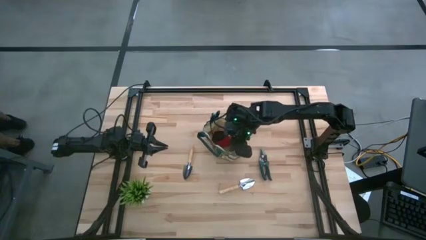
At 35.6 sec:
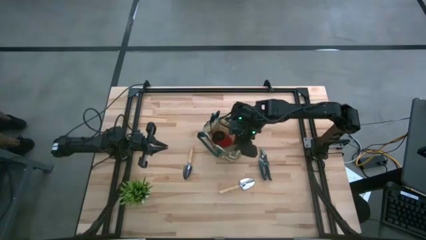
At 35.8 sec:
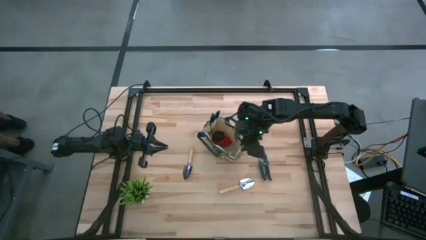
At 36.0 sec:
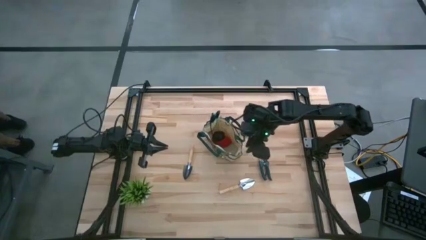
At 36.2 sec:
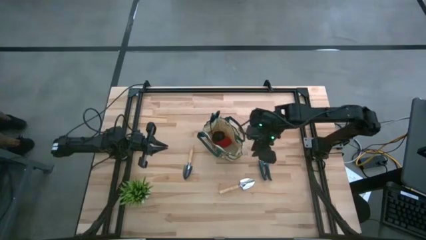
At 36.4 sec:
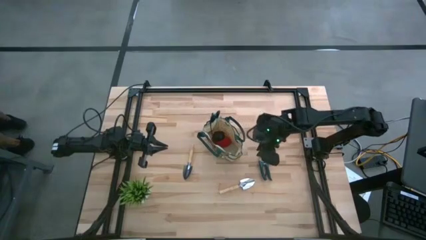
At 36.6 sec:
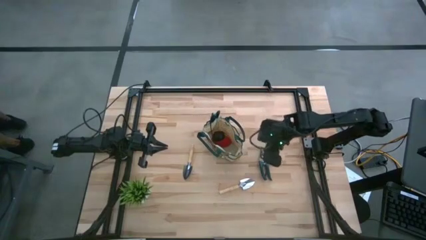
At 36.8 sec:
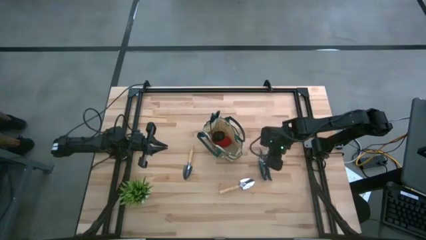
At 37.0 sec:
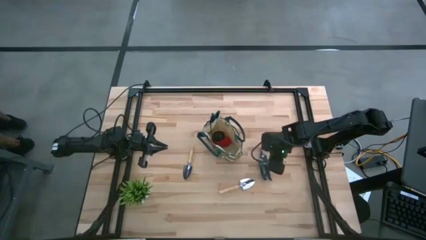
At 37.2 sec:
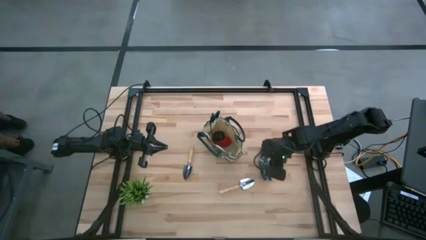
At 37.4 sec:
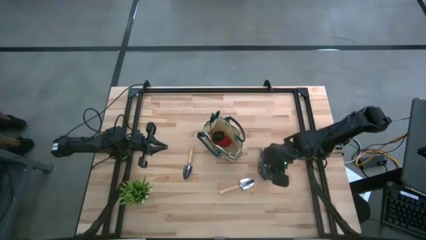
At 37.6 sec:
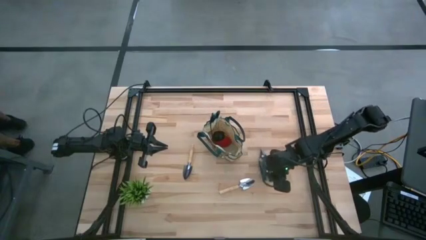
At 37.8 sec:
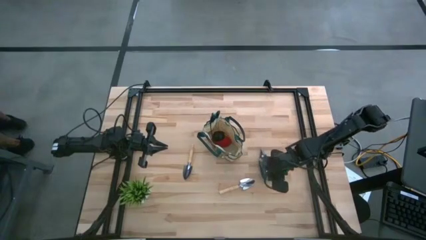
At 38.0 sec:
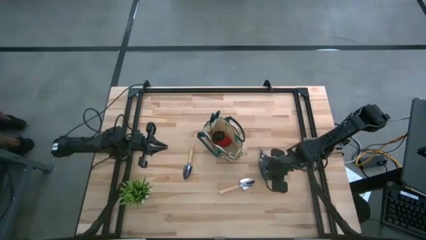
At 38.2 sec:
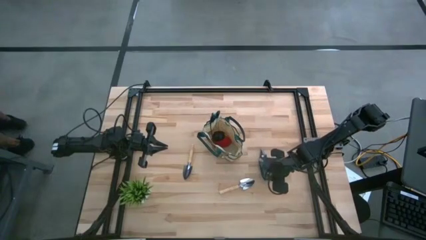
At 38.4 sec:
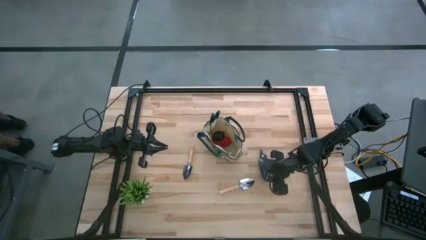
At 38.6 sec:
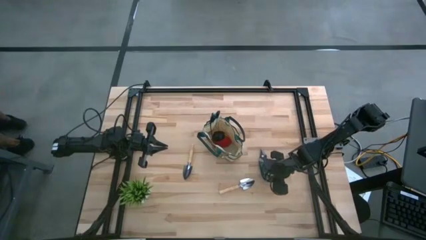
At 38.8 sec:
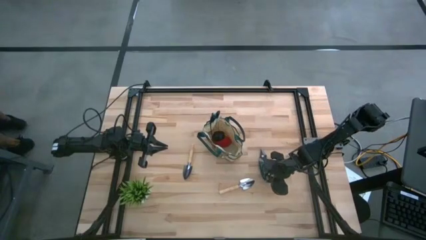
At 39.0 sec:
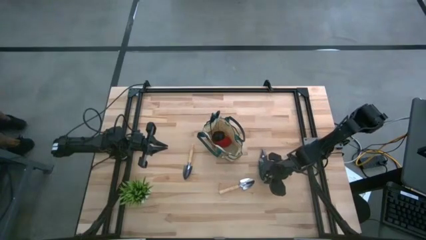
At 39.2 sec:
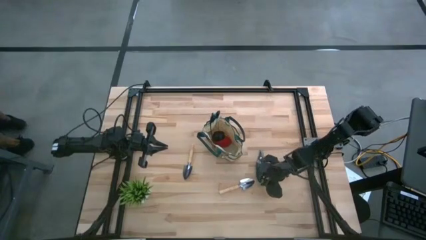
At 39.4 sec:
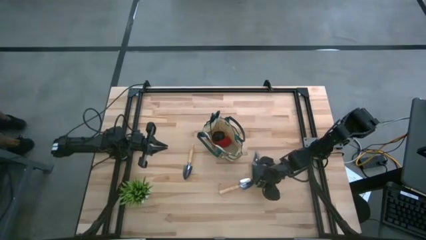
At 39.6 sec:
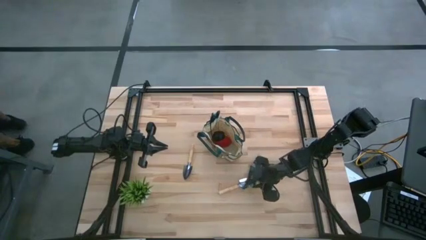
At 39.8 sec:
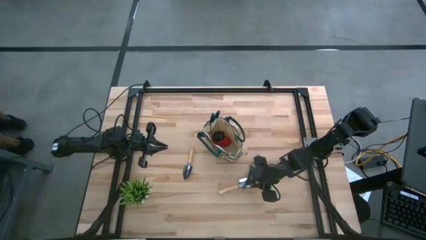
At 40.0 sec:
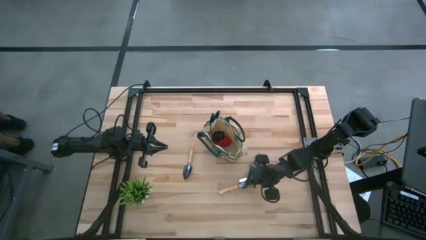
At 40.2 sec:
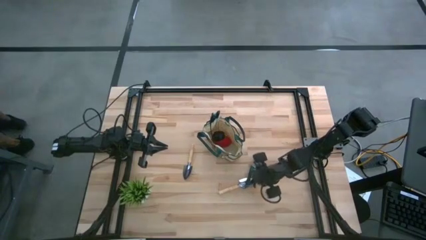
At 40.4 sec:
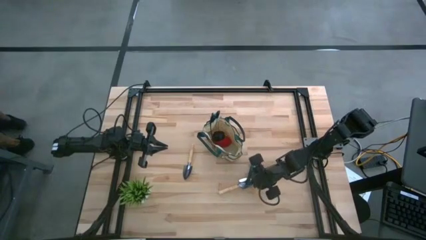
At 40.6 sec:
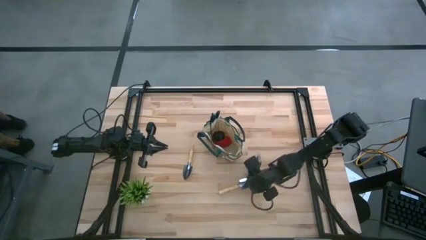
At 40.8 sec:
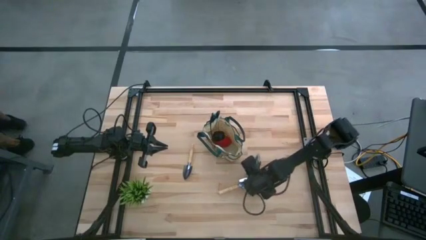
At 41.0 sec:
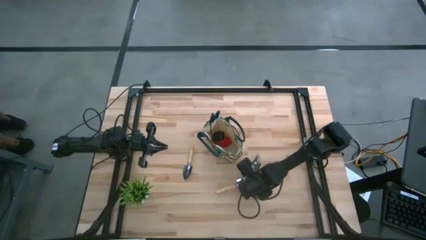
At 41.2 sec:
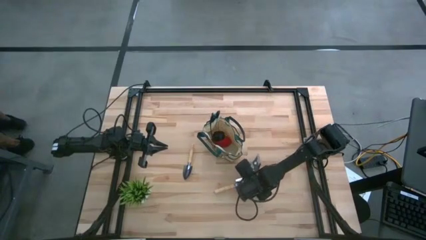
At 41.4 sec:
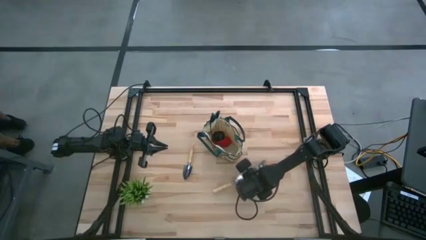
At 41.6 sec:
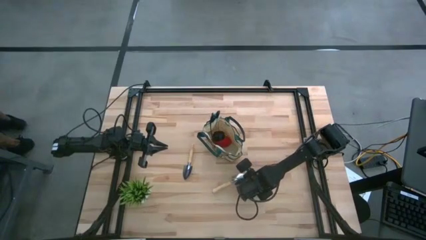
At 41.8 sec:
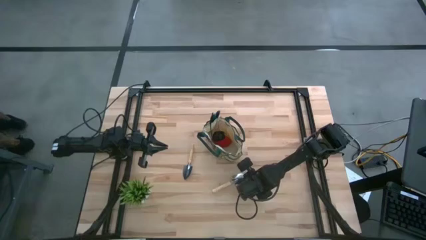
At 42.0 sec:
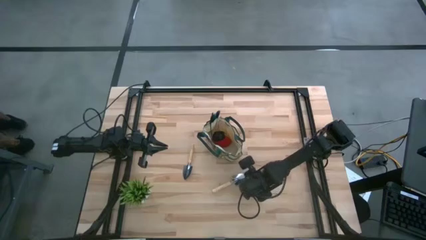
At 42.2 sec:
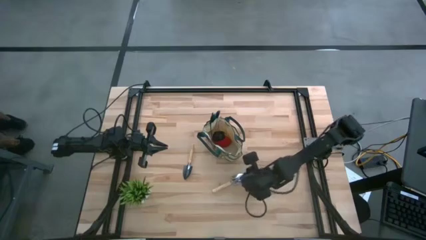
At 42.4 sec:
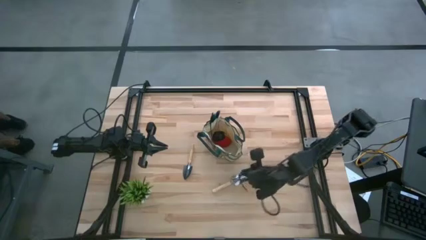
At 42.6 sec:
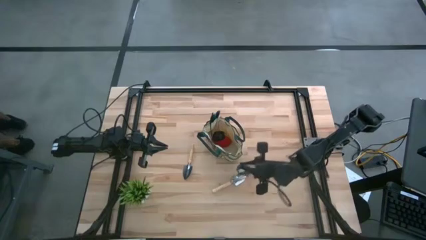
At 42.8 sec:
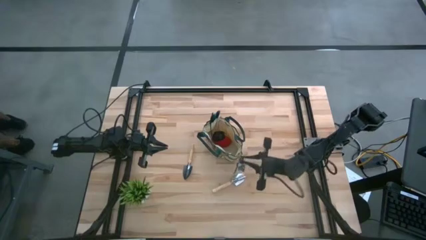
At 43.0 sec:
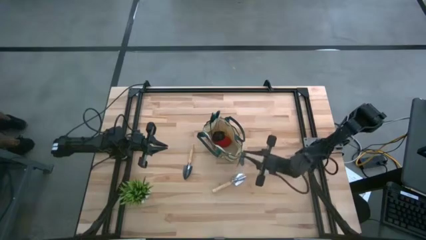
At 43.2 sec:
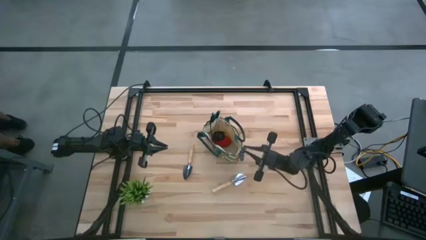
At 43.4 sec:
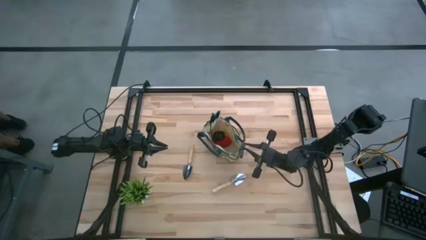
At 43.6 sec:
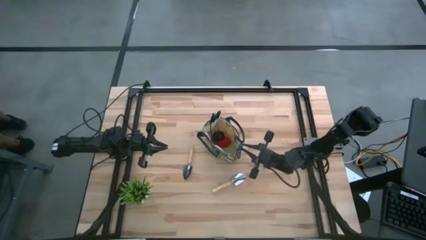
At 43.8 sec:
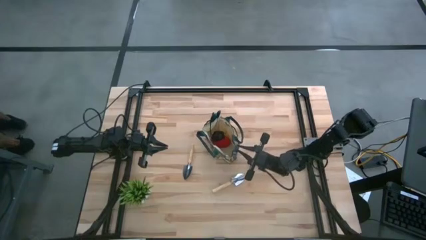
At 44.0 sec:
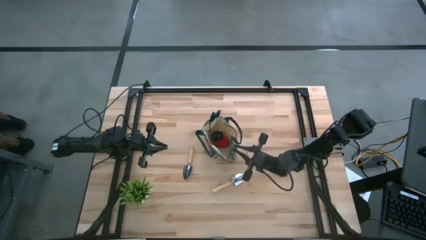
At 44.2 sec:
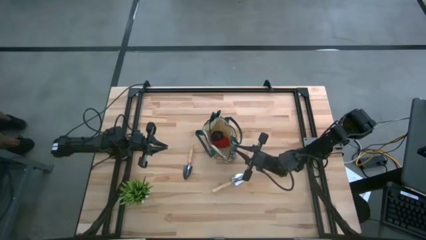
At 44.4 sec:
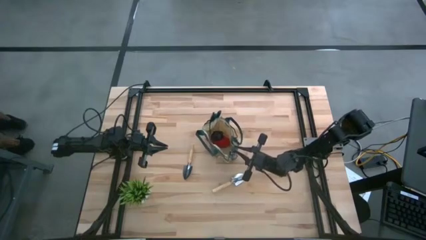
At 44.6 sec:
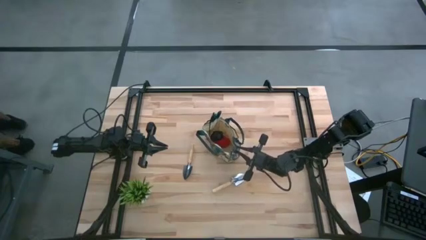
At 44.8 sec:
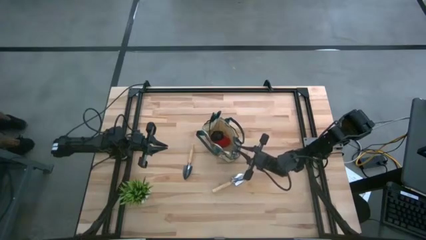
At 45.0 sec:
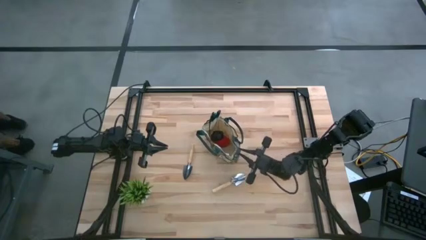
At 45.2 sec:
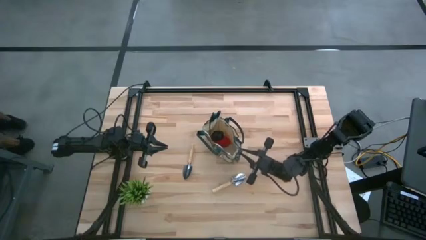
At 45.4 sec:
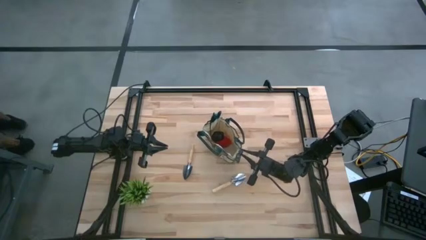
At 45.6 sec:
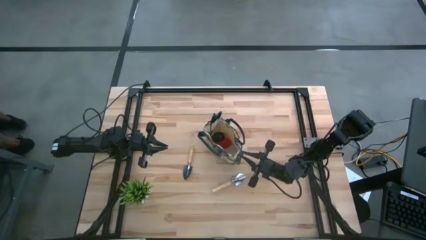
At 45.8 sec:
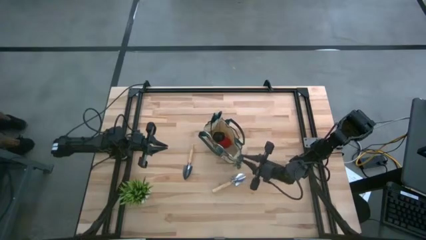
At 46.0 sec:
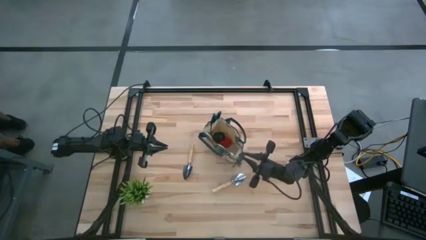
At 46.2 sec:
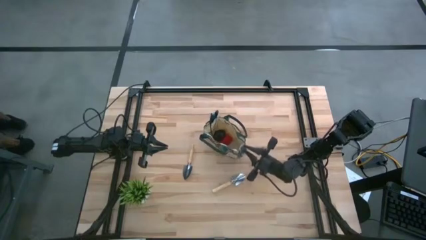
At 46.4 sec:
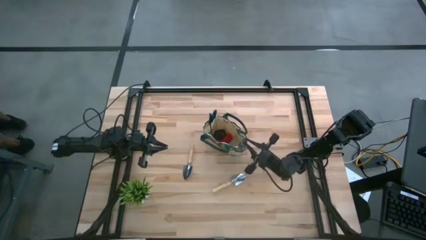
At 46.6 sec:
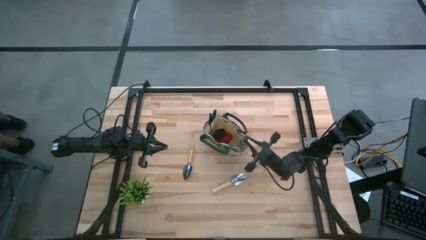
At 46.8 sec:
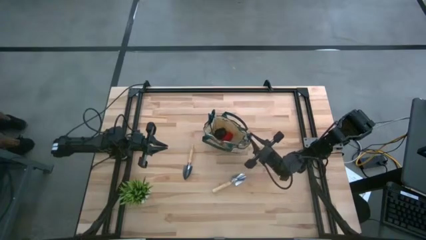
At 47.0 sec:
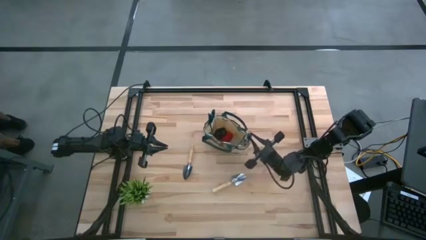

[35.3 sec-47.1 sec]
Task: Pick & Place Garden tools in Gardening bag
Put the shear scissors into the gardening bag

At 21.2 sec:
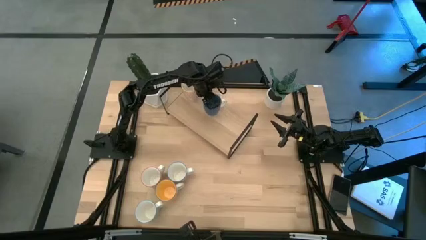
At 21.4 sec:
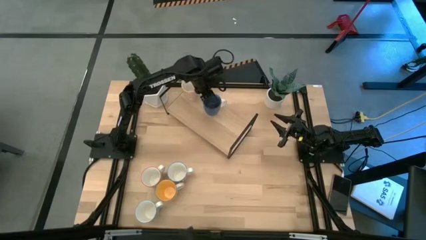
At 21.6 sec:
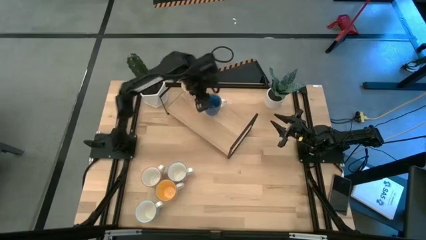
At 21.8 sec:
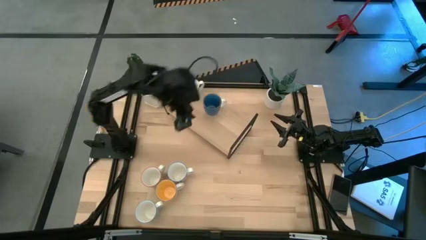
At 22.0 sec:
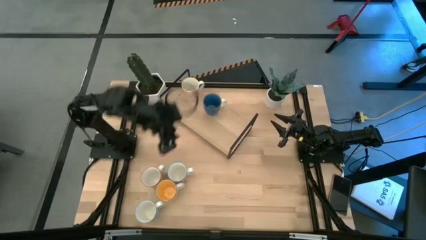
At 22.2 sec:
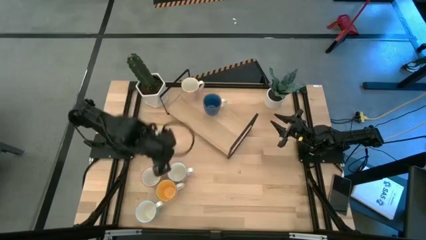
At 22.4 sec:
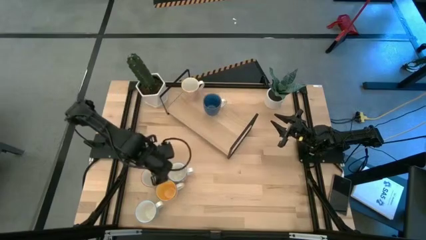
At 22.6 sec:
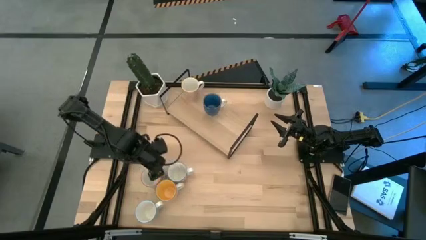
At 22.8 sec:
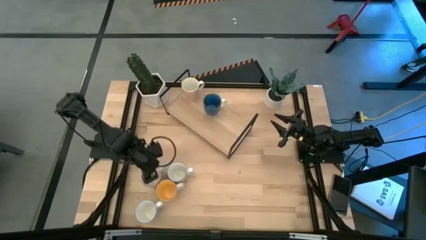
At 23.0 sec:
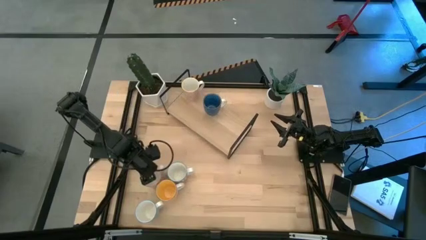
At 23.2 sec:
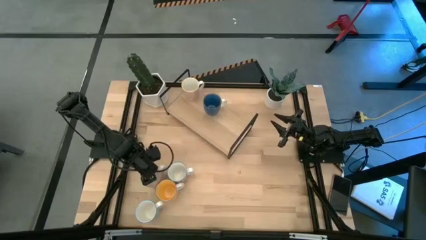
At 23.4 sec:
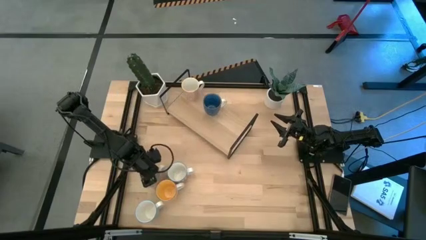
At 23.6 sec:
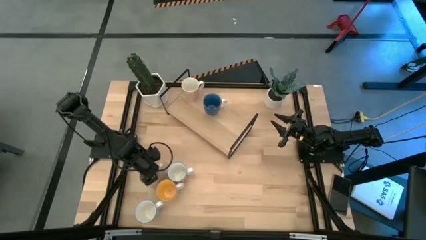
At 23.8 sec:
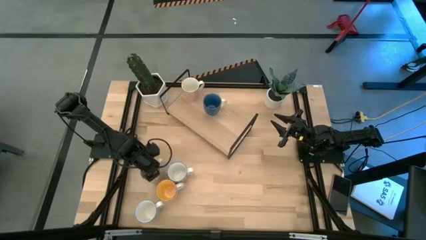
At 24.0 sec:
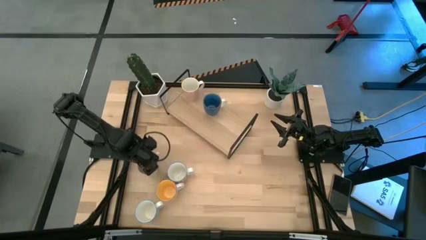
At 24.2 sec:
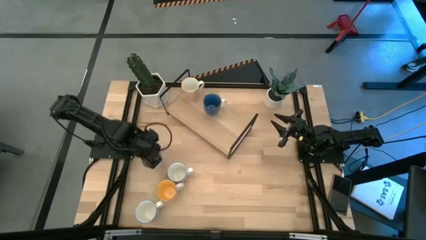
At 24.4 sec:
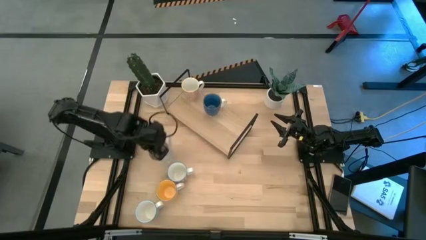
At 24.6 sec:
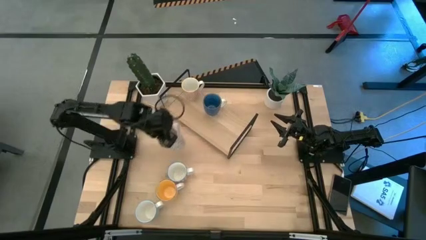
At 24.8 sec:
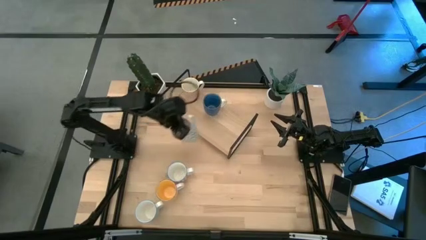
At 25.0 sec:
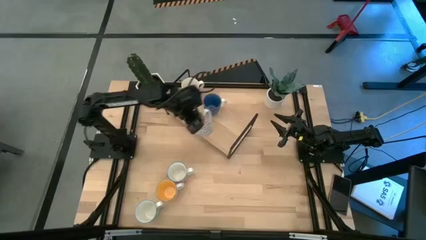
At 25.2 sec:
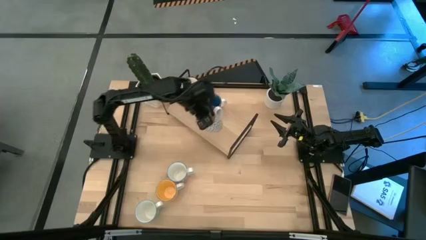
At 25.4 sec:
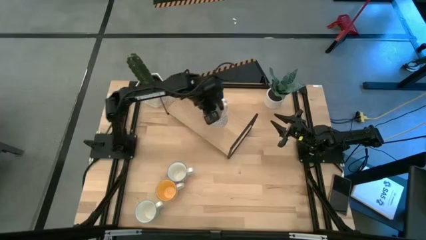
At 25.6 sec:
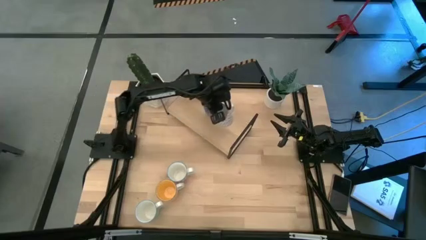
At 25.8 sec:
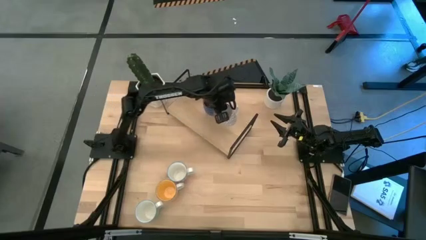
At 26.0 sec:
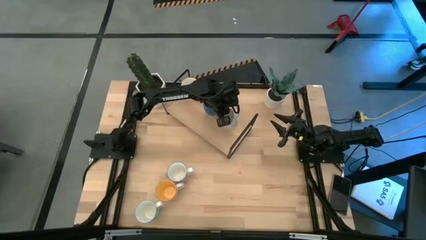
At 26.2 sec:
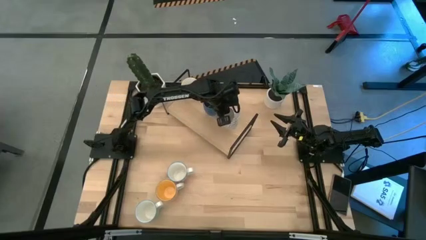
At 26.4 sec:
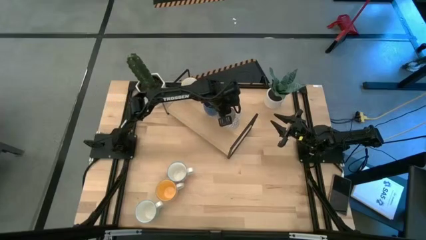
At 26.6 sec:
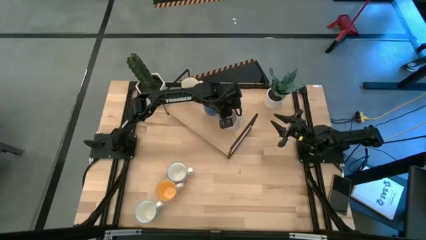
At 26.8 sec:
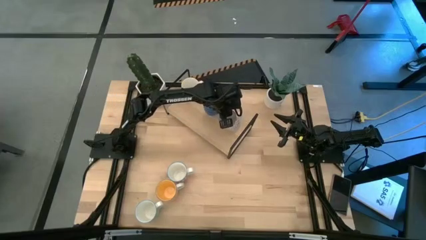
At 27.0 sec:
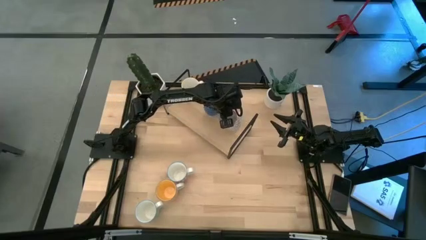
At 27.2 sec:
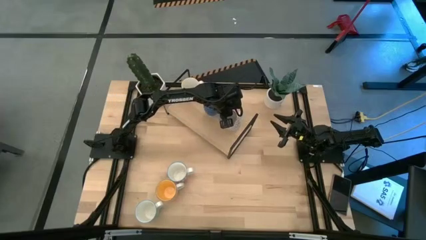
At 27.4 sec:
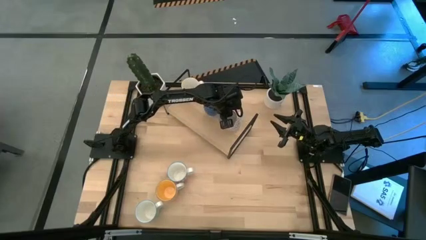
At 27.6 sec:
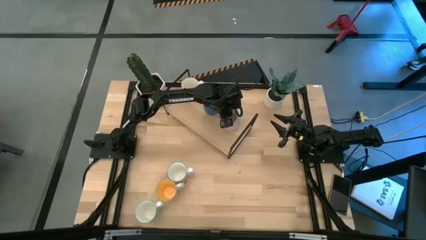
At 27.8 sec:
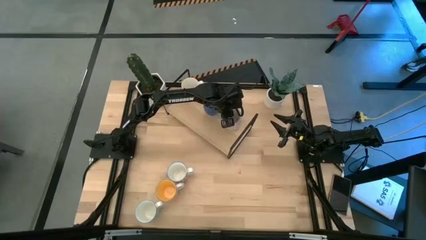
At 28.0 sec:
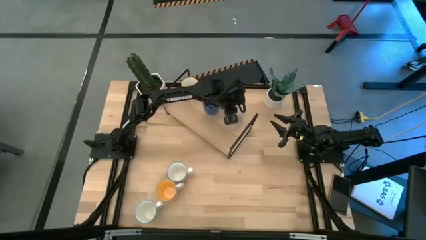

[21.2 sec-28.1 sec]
Task: Place coffee mugs
Put the gray patterned mug on the shelf
